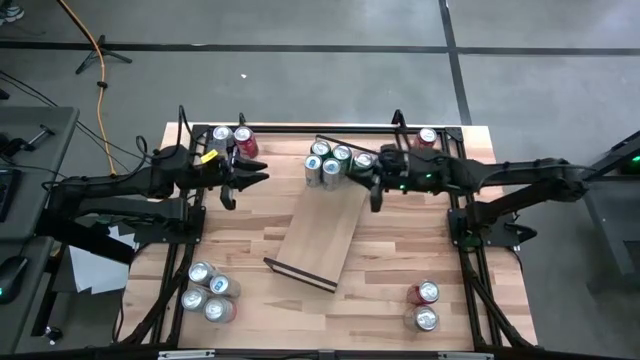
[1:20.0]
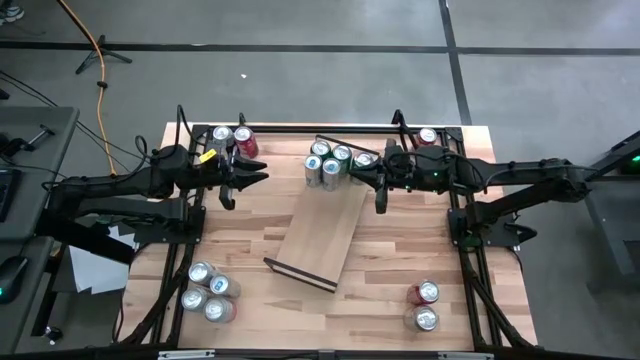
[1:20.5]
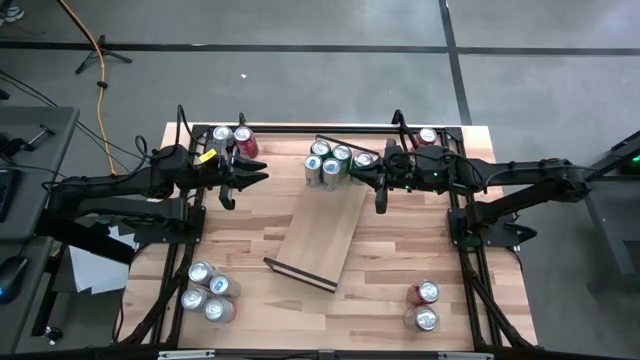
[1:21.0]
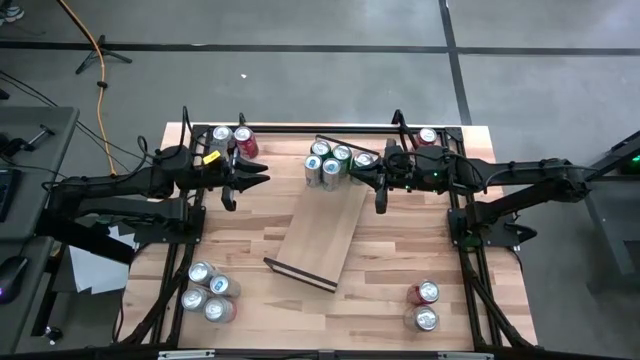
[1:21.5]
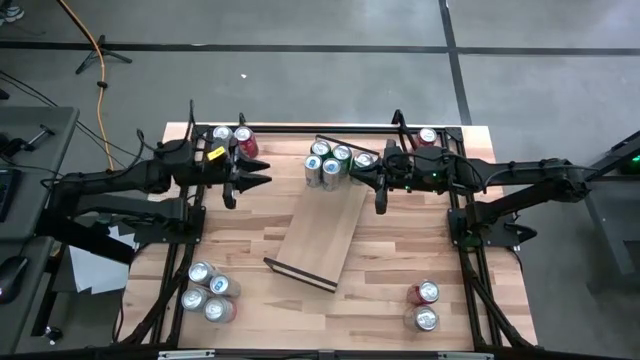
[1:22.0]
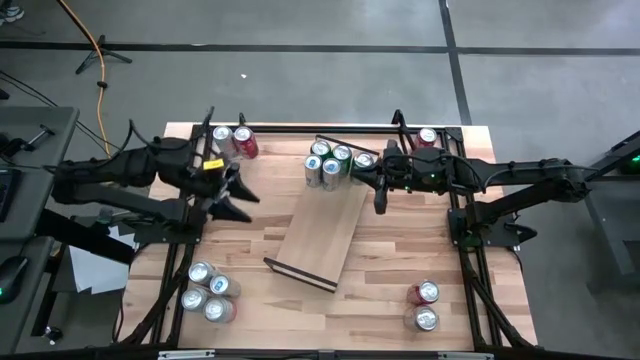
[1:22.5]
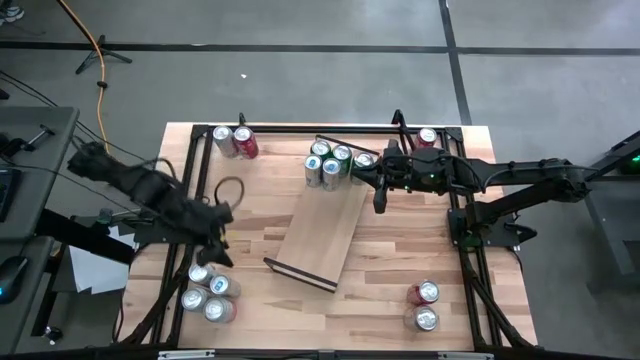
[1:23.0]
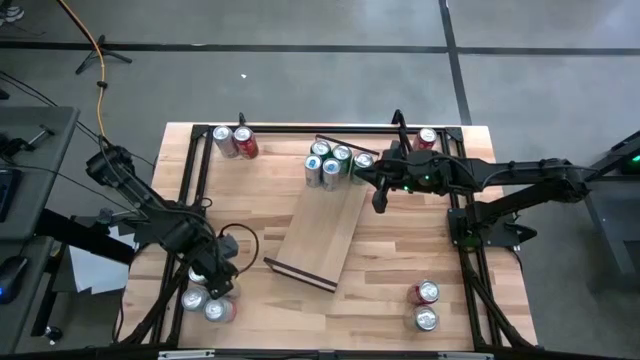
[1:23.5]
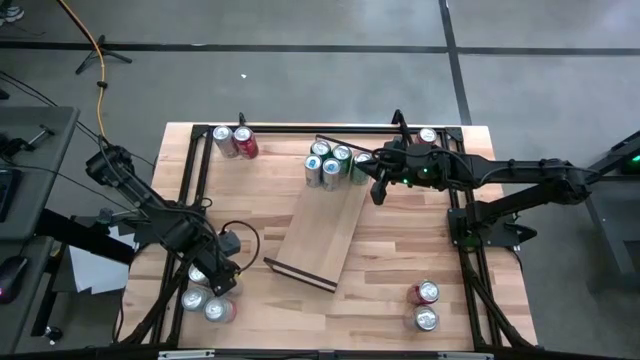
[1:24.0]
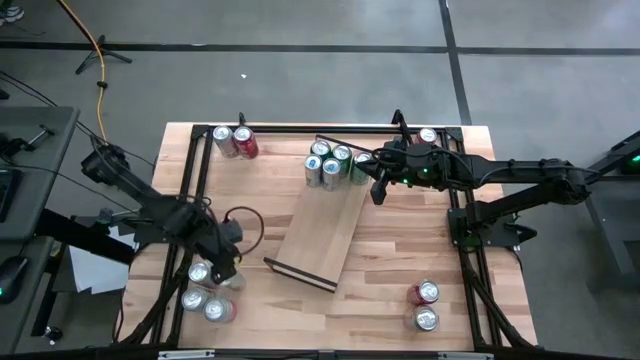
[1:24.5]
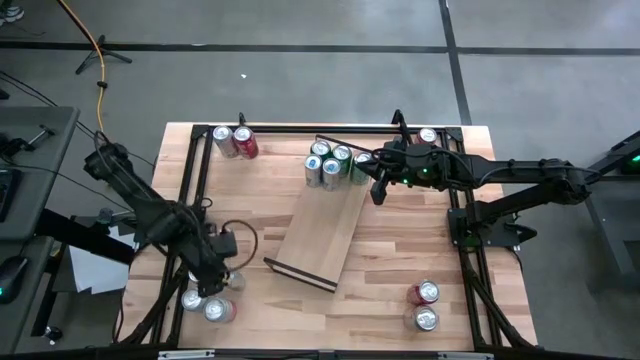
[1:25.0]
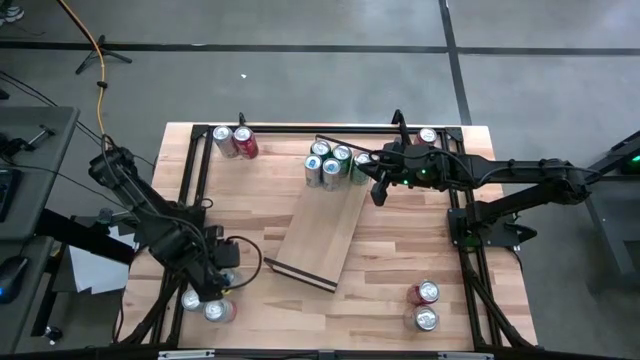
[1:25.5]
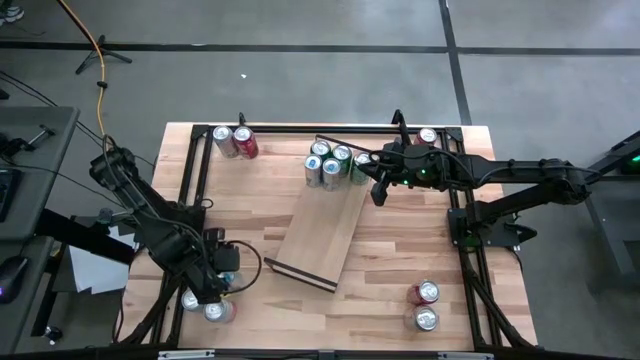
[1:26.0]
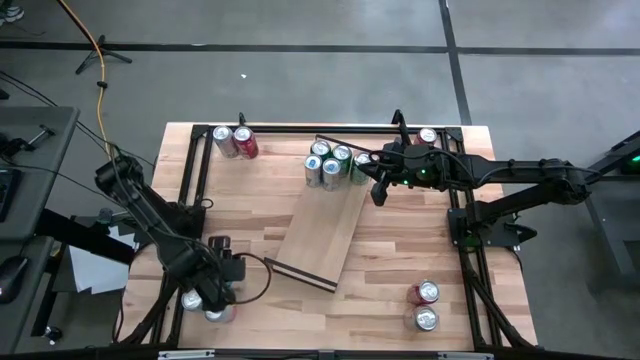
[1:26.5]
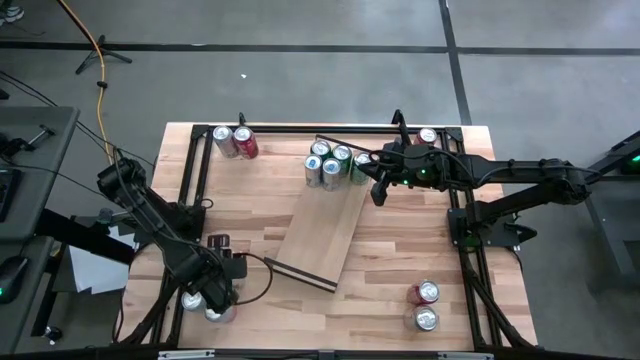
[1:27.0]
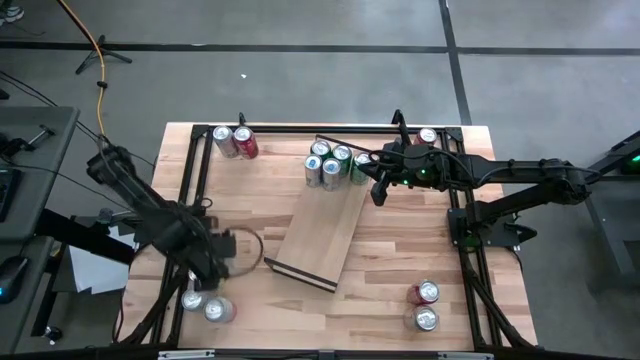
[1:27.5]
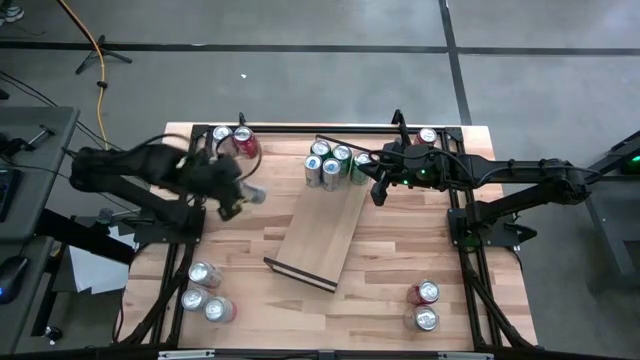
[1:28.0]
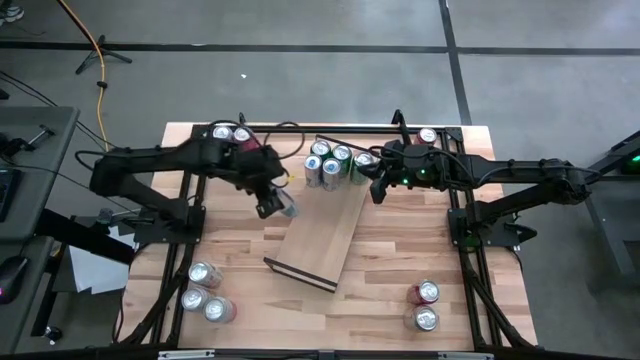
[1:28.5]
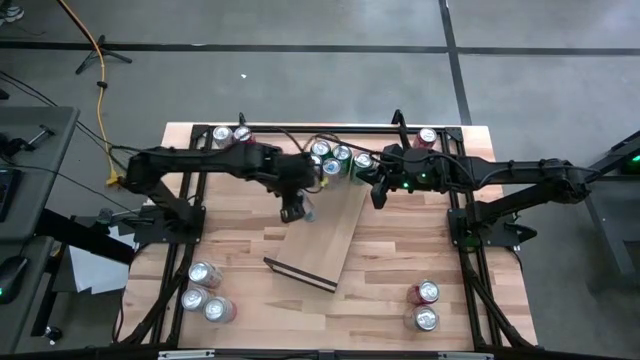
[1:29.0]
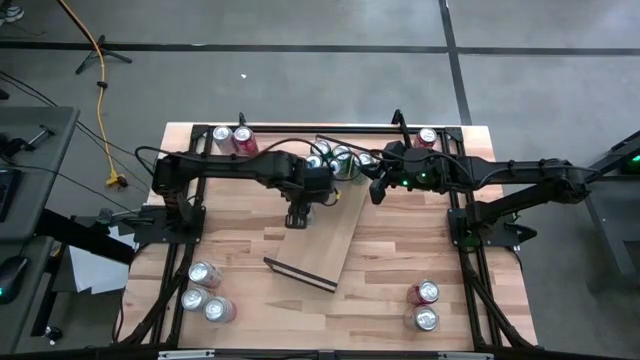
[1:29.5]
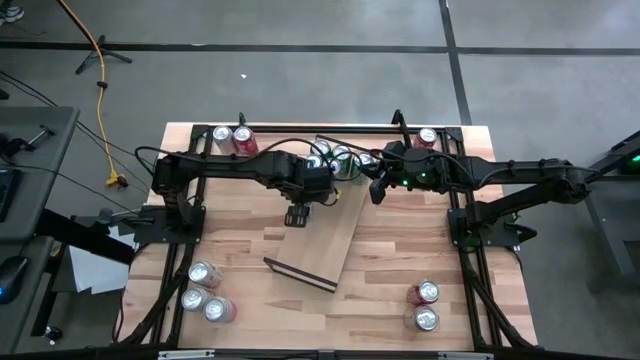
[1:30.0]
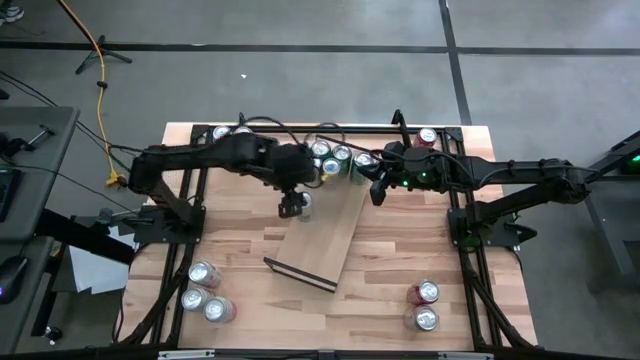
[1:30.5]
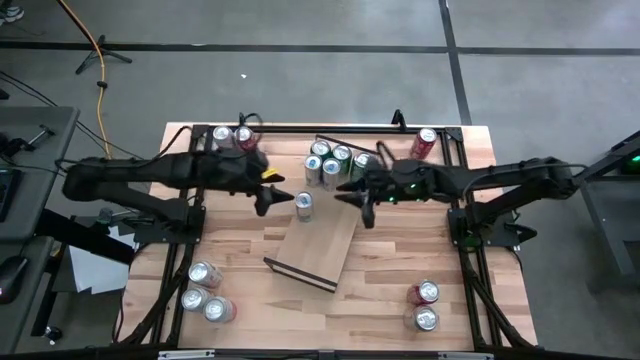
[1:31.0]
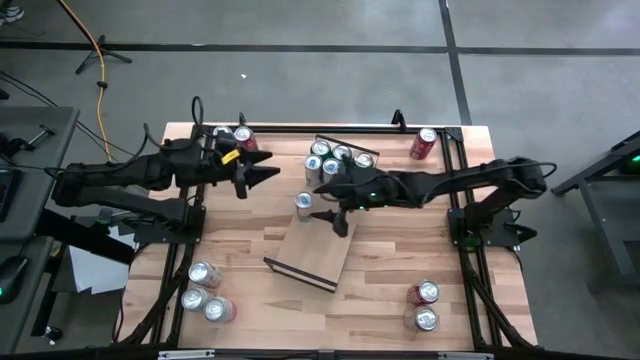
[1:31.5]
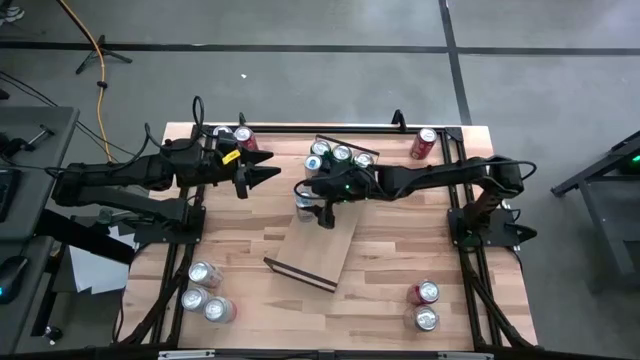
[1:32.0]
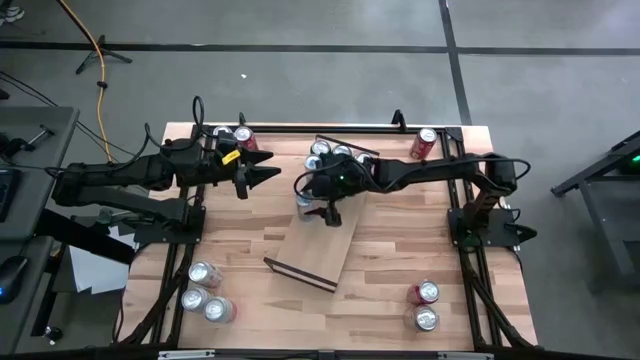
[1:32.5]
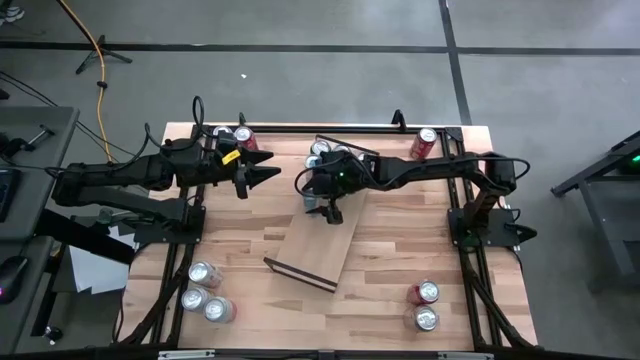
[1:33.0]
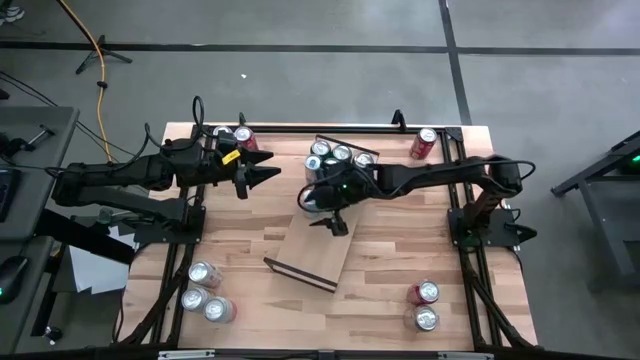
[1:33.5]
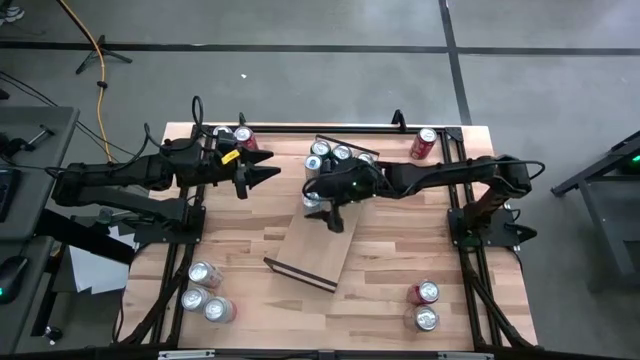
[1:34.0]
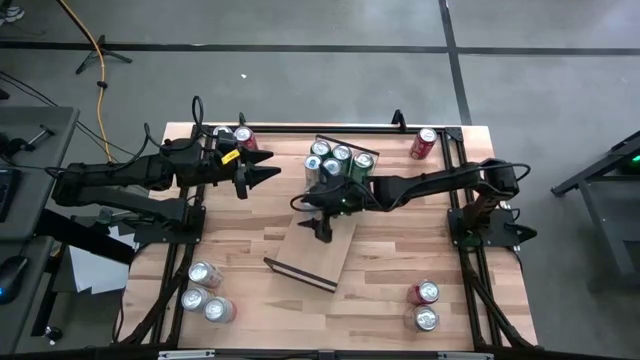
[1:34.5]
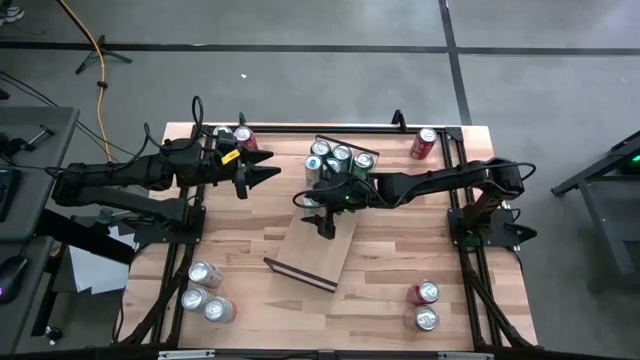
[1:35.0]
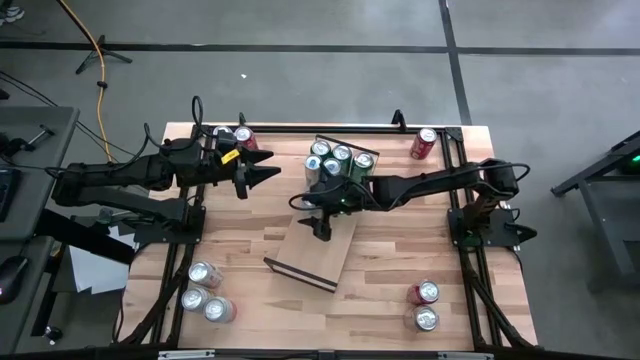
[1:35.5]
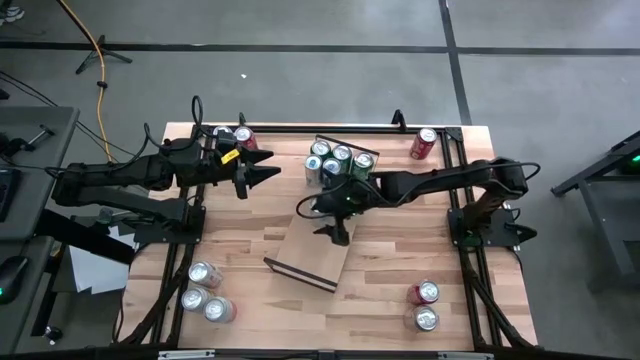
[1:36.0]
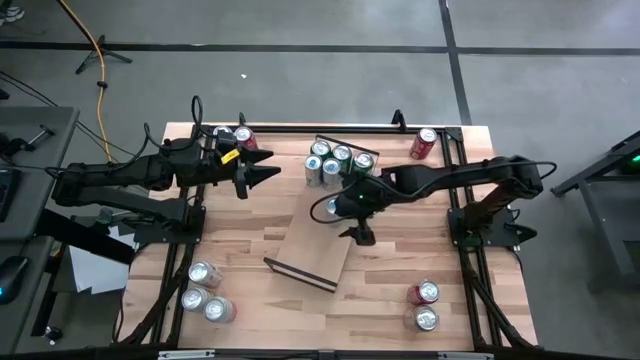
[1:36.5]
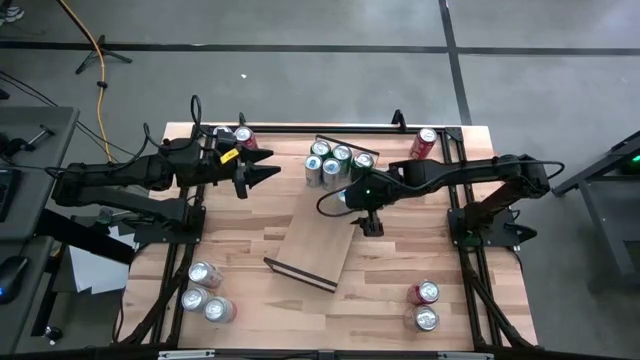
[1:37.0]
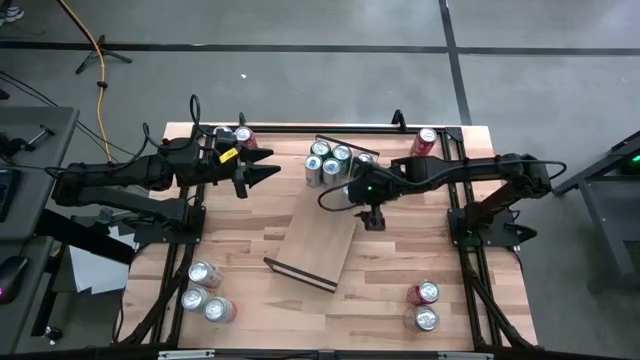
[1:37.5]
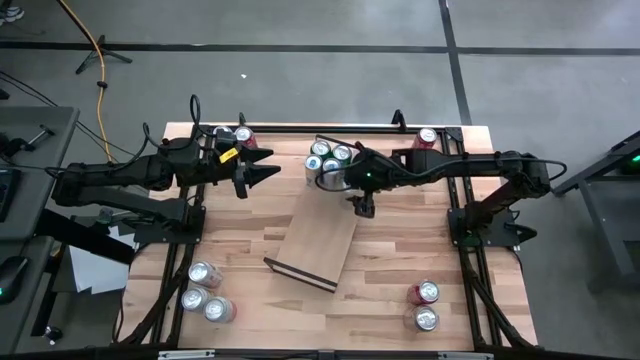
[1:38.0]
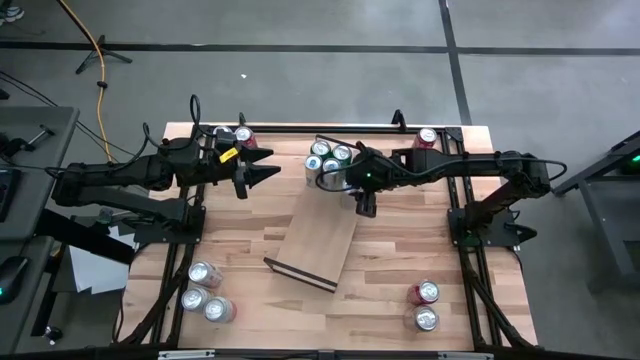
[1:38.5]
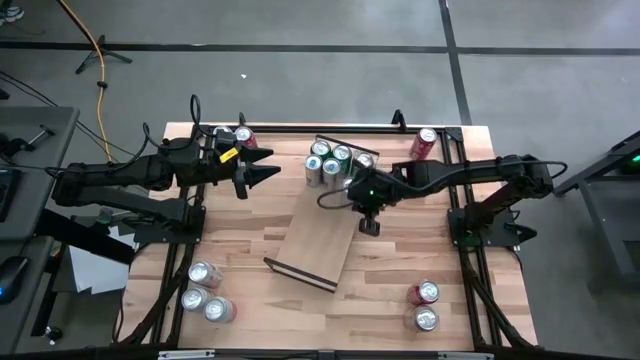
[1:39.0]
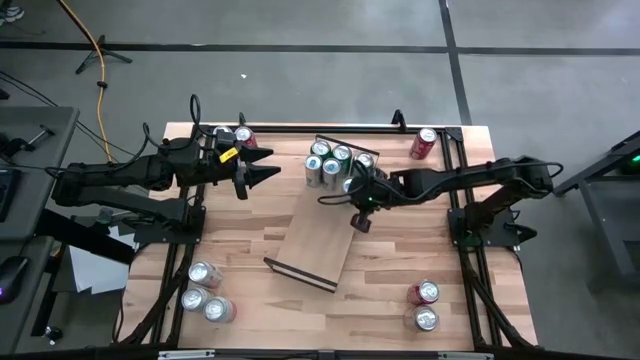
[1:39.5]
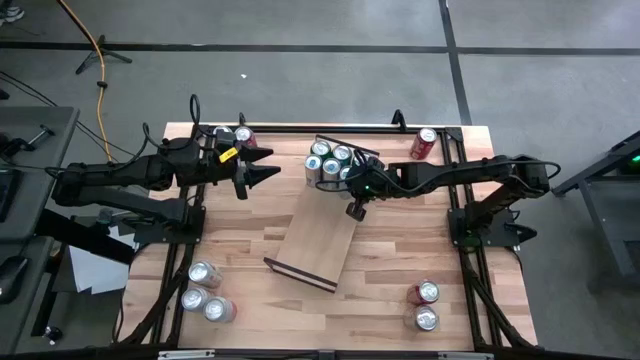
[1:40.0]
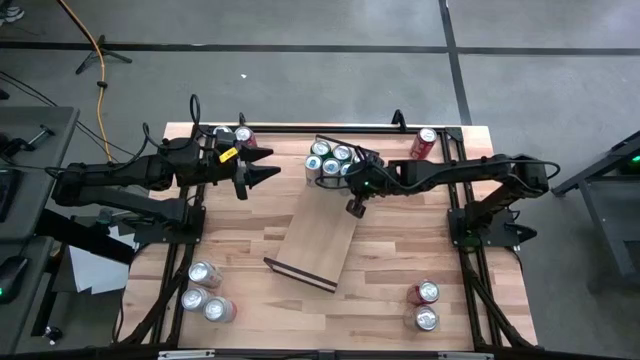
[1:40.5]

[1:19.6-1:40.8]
Task: Place canned beverage on shelf
Put the blue soda can on the shelf aligned with the other blue soda can

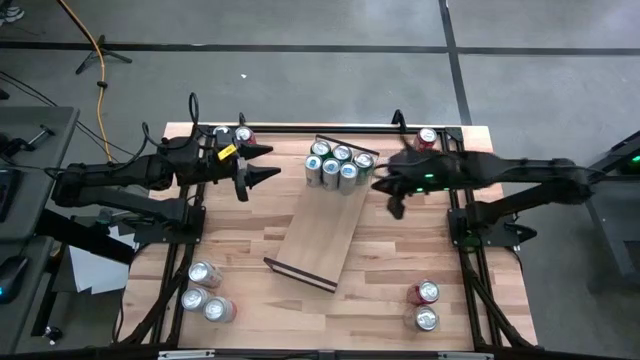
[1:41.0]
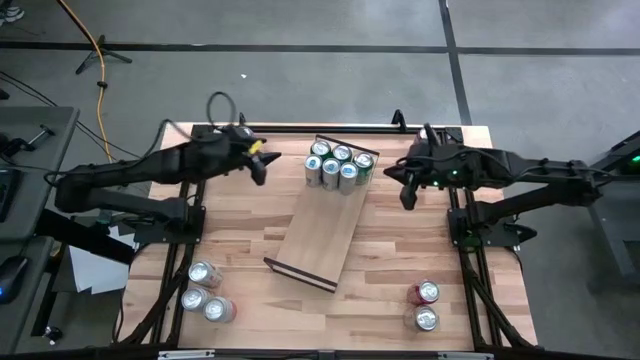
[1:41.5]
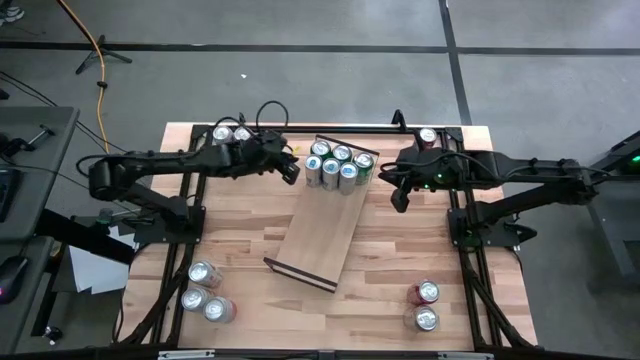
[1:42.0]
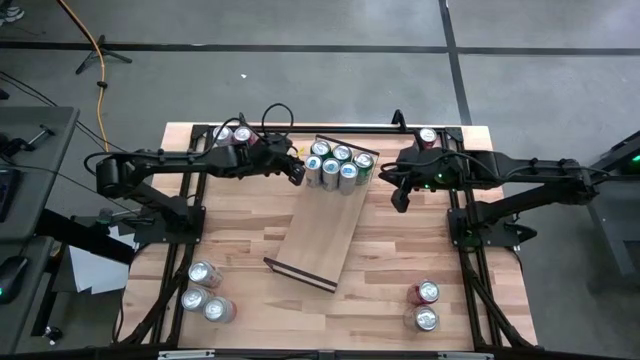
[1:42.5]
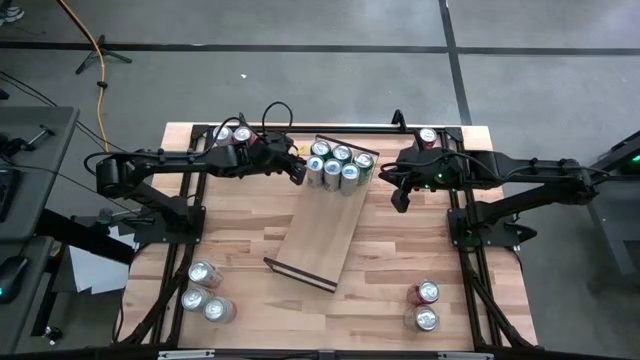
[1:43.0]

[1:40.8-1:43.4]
Adjust the blue soda cans on the shelf
